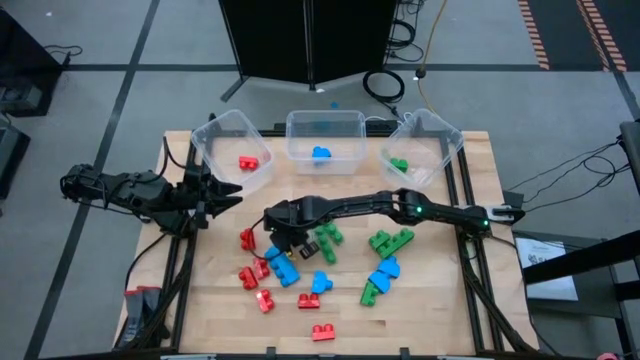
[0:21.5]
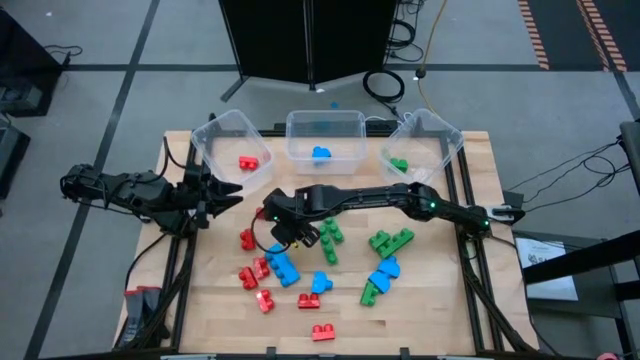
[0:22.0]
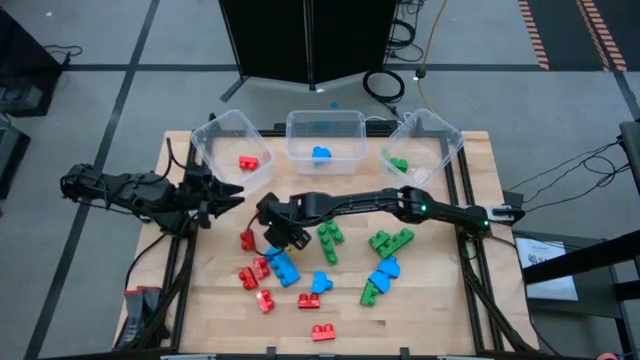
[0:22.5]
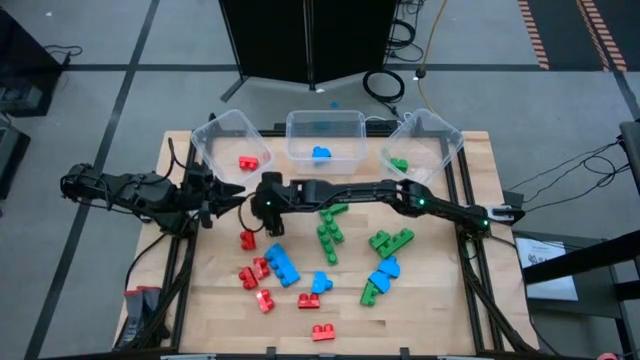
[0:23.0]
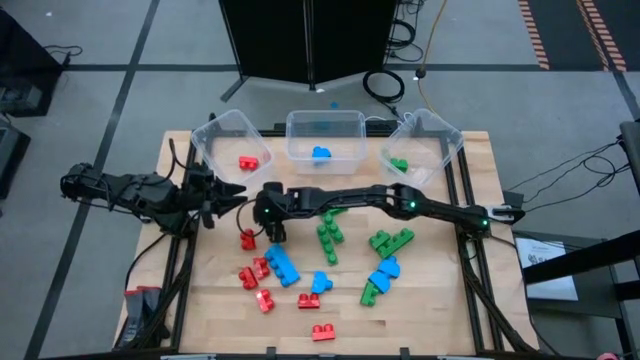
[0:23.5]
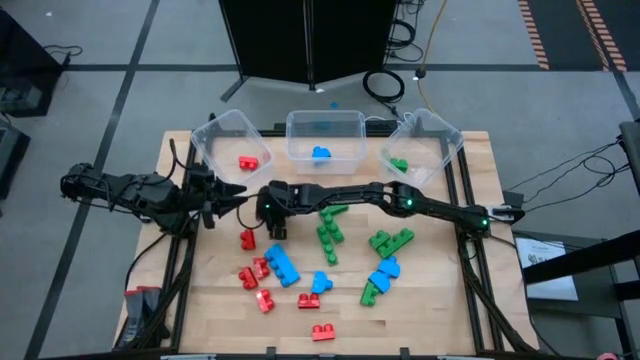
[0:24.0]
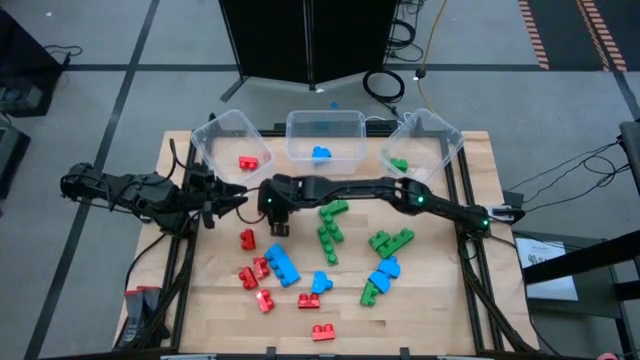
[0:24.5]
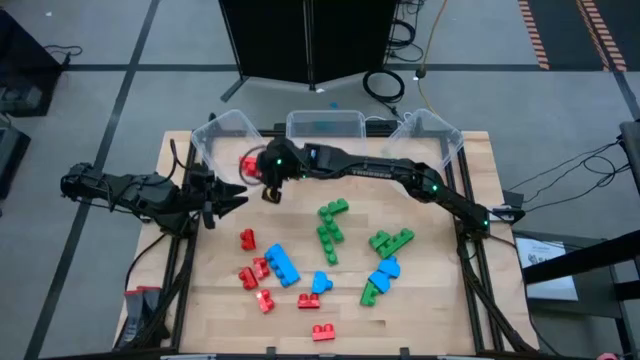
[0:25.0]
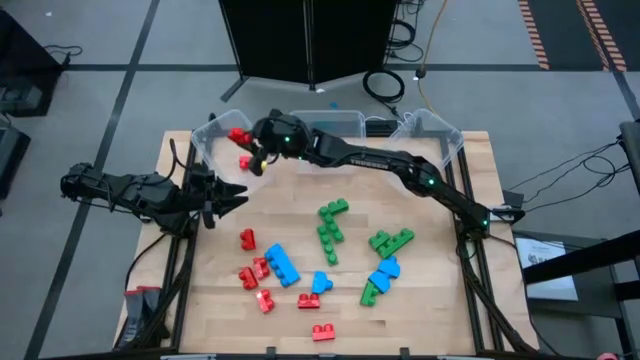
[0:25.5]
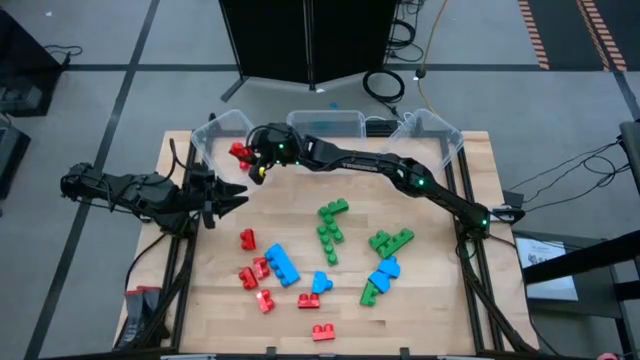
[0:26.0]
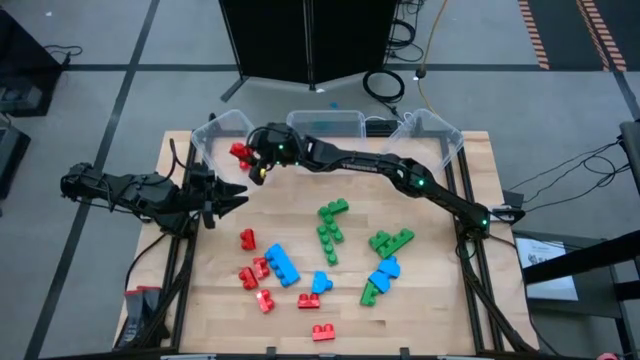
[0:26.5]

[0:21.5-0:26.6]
Task: Sort blocks
Put the red game piece into the left transparent bin

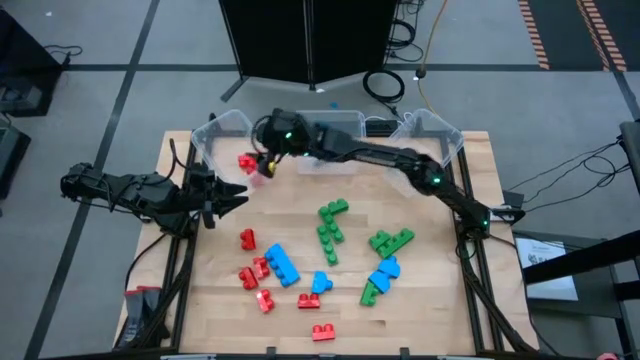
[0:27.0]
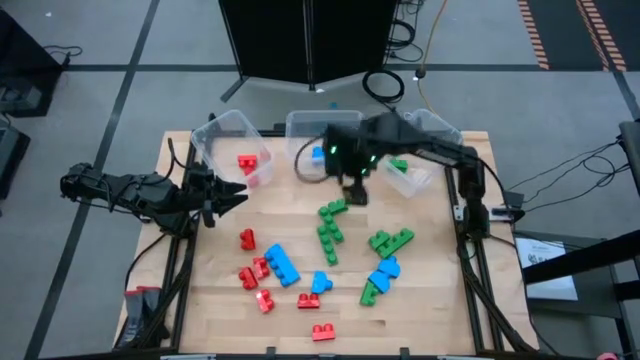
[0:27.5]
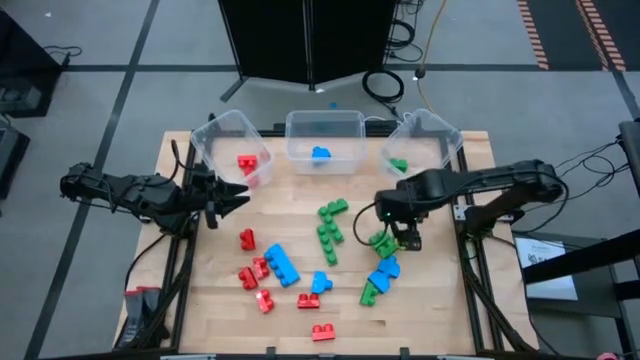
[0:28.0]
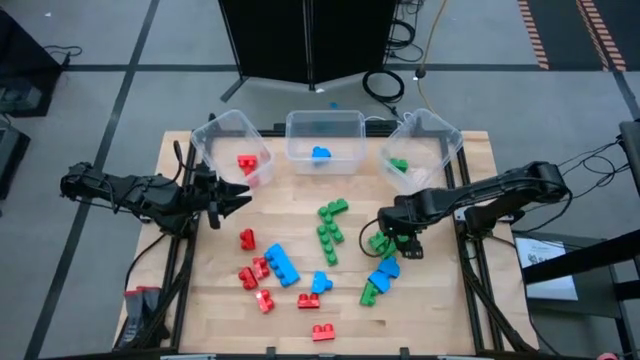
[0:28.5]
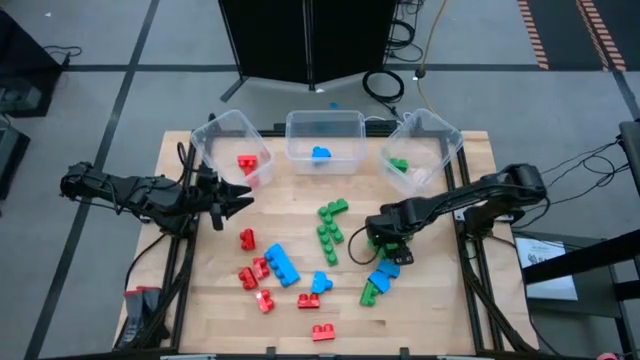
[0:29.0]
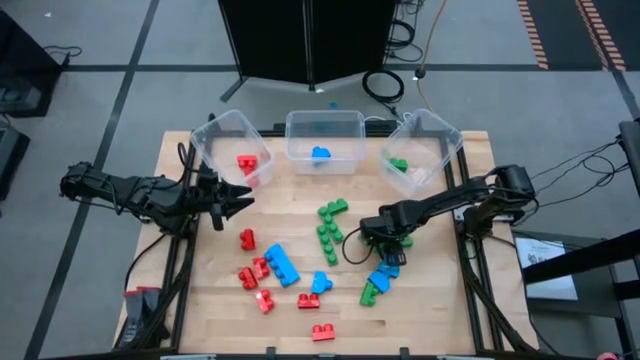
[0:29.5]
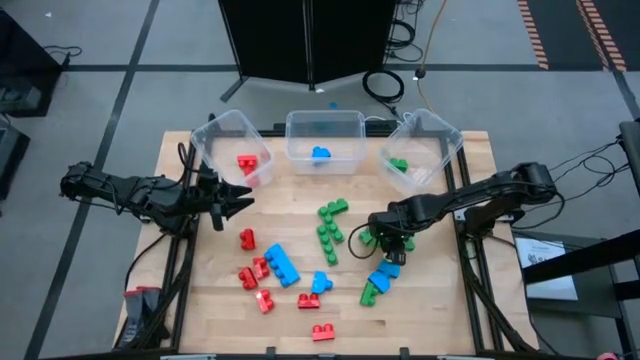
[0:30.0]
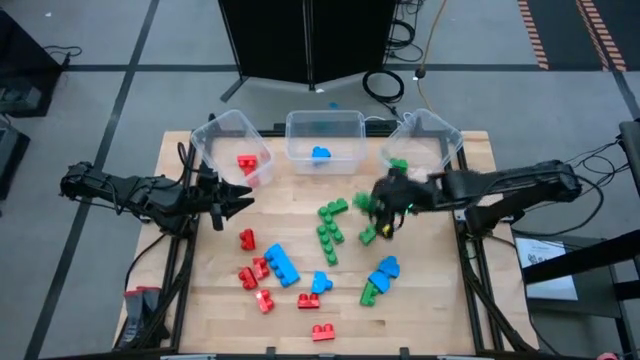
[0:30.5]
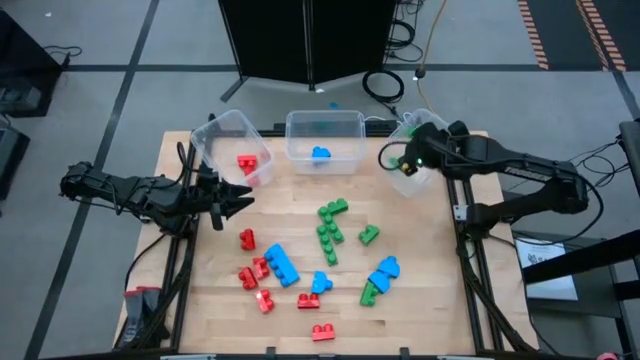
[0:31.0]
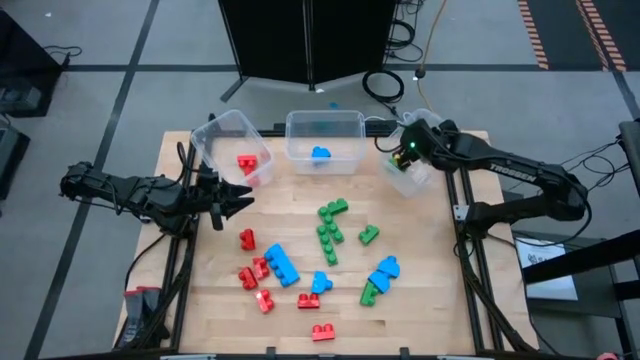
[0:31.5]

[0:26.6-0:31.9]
Put the green game piece into the right transparent bin

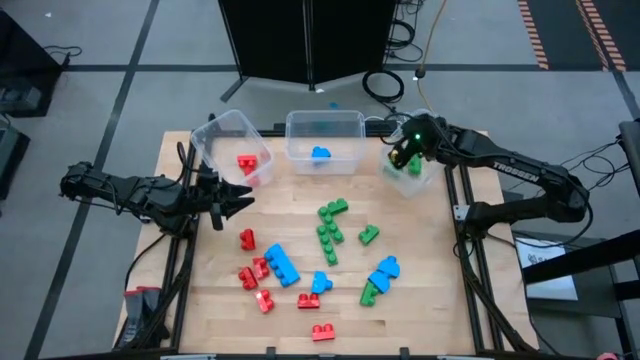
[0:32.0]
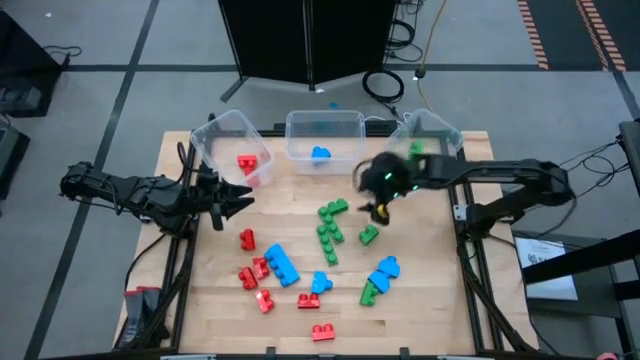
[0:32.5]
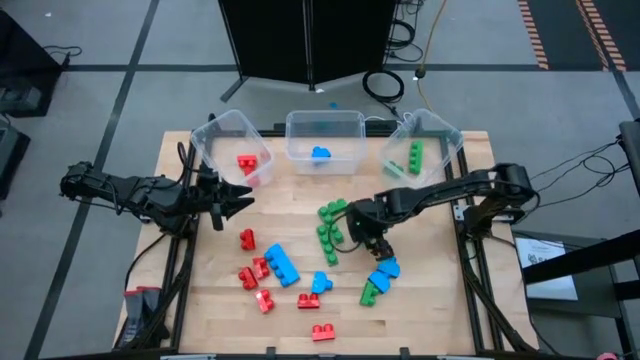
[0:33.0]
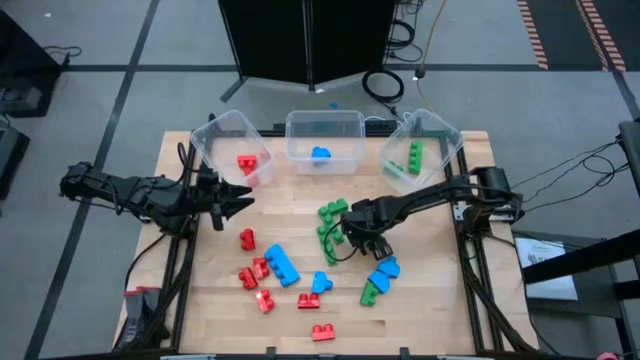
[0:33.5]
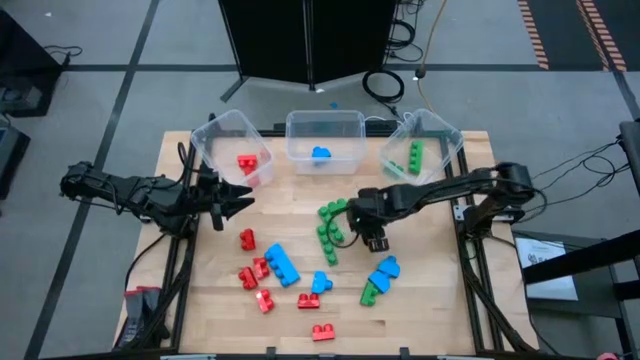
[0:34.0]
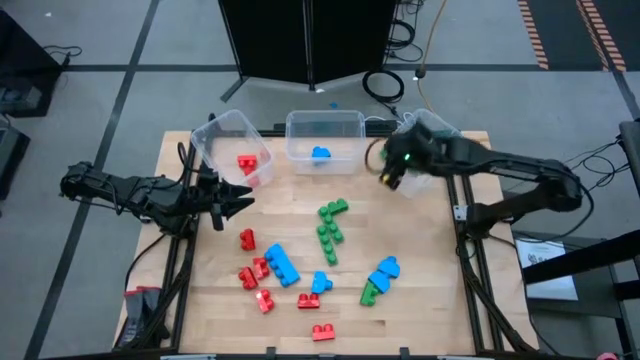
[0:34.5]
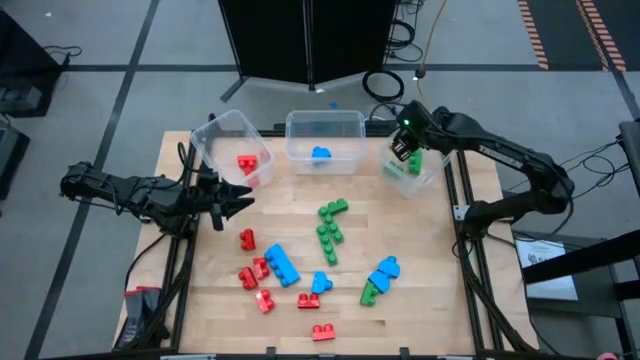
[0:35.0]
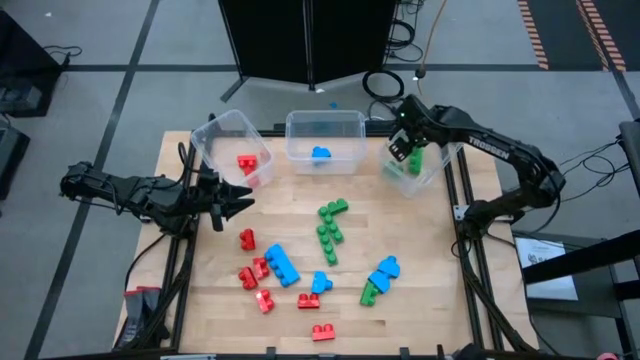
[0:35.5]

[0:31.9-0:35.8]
Put the green game piece into the right transparent bin

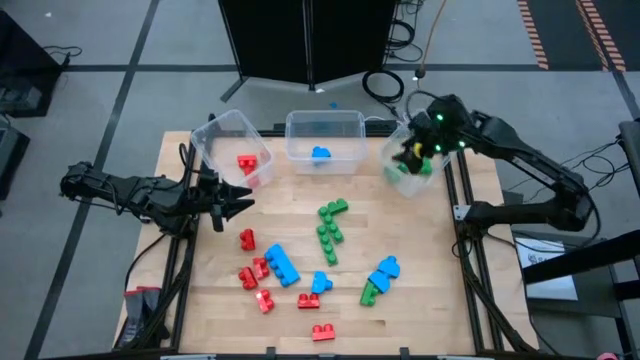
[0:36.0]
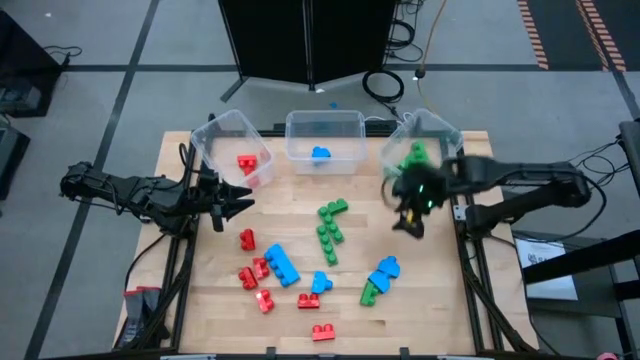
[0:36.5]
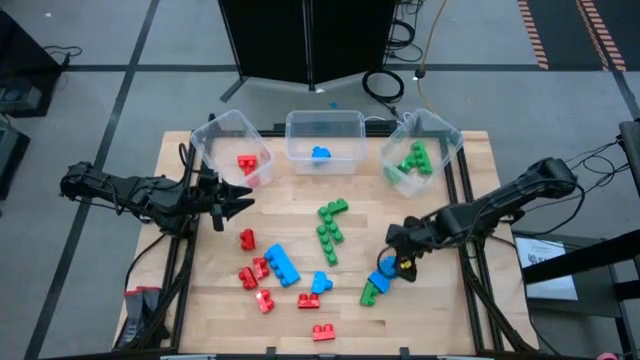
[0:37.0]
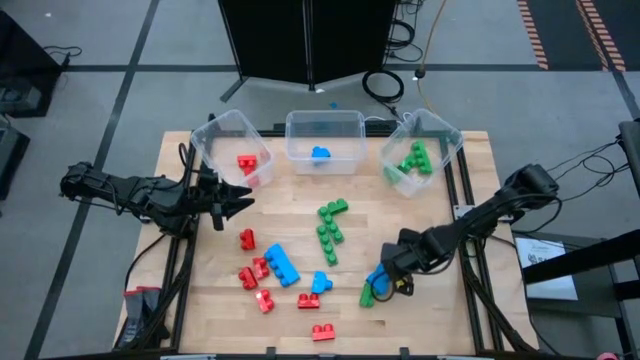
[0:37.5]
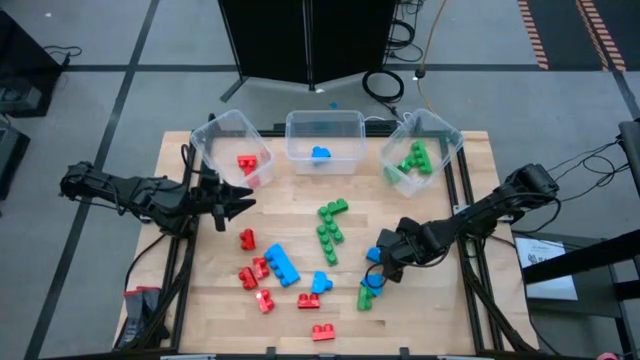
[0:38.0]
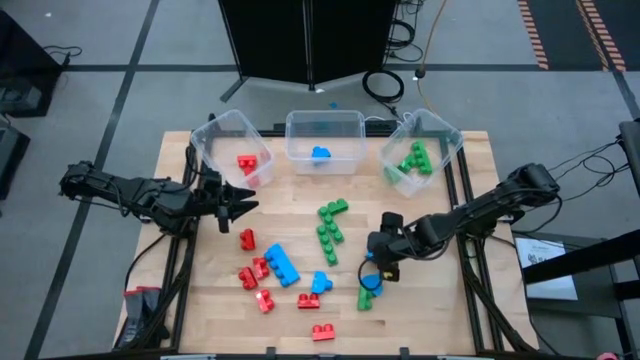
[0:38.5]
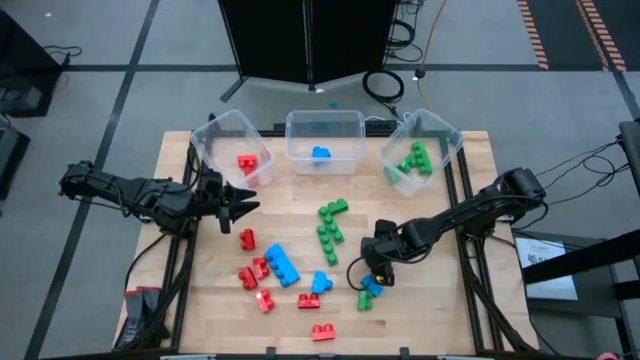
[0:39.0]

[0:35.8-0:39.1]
Put the blue game piece into the middle transparent bin

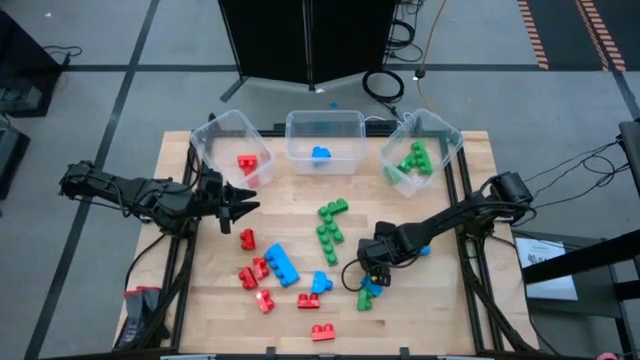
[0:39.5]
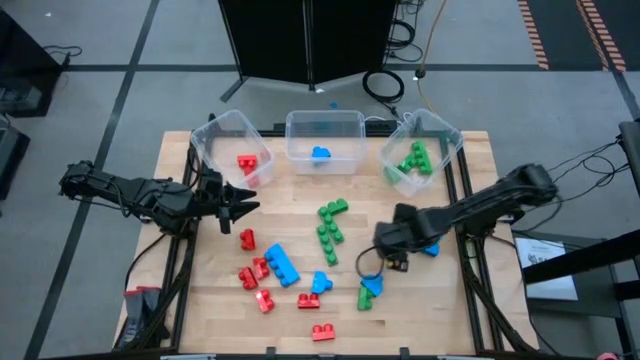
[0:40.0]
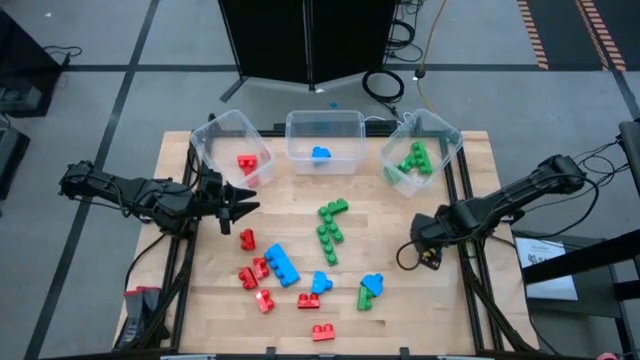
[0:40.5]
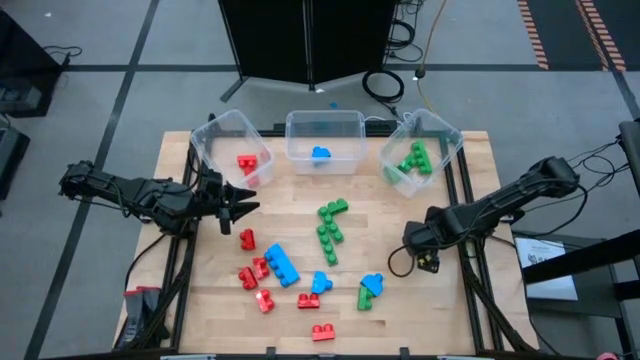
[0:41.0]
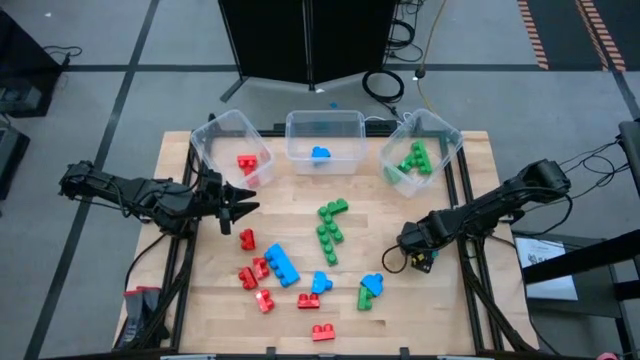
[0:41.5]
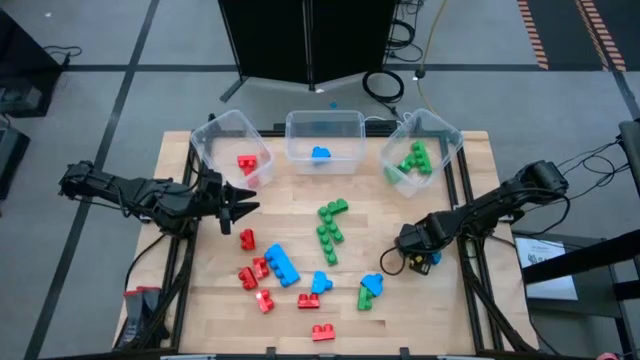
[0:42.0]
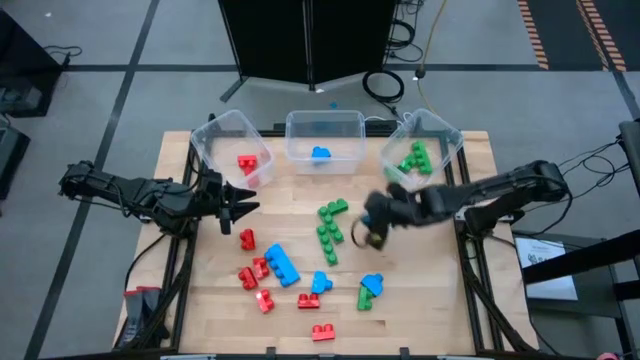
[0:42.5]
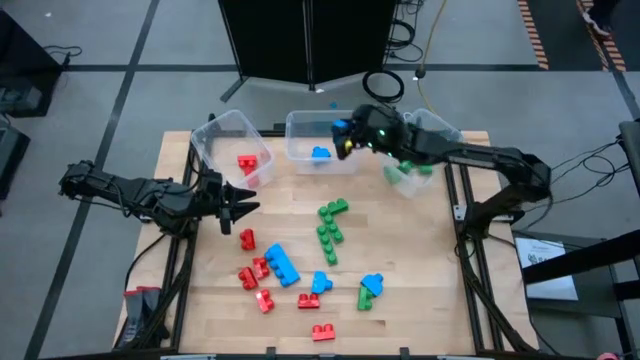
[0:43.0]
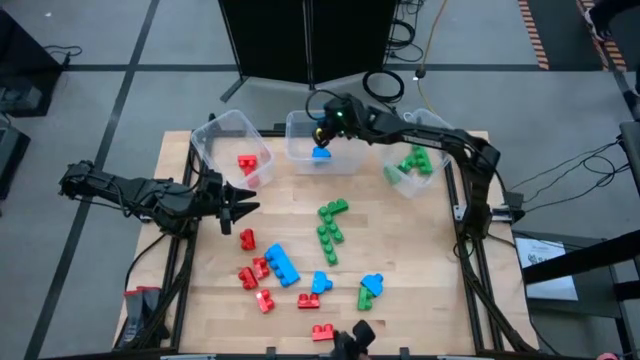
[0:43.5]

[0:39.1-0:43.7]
Put the blue game piece into the middle transparent bin
